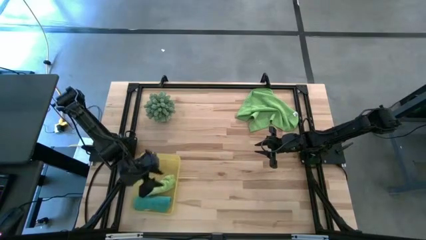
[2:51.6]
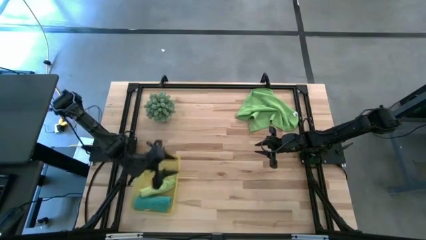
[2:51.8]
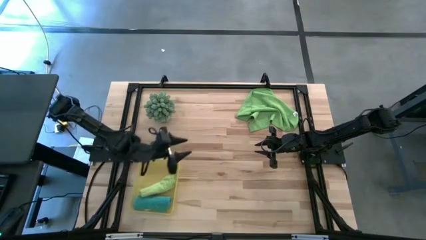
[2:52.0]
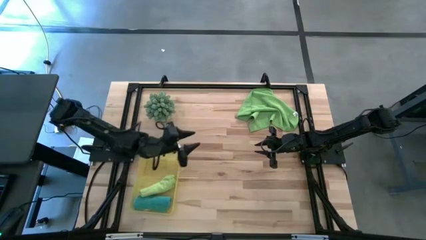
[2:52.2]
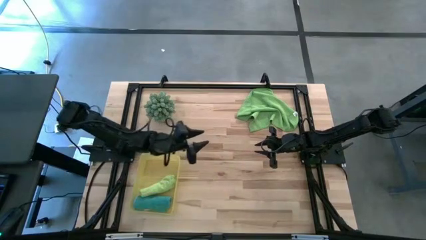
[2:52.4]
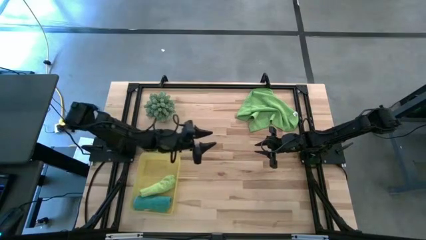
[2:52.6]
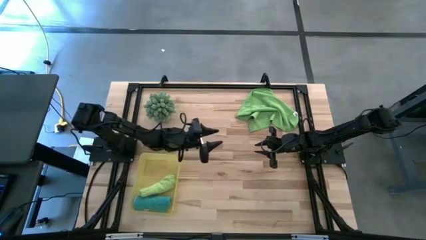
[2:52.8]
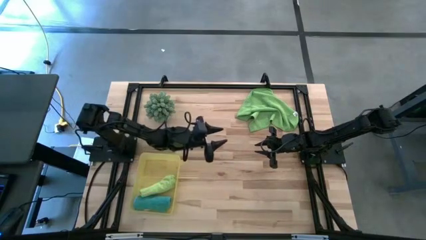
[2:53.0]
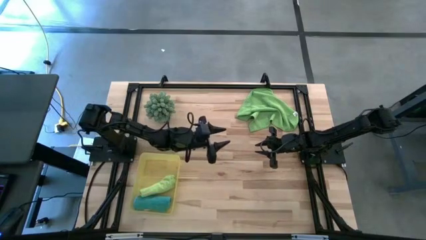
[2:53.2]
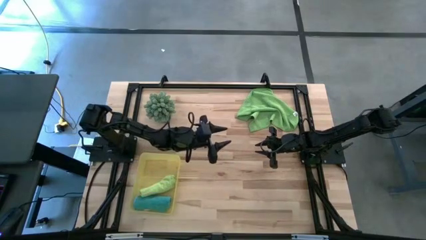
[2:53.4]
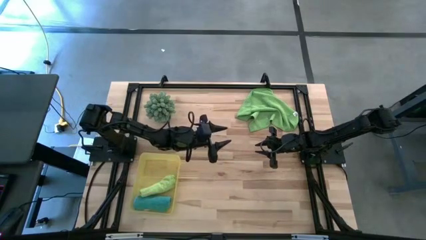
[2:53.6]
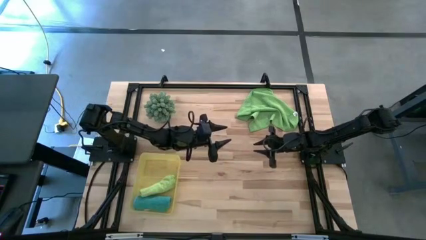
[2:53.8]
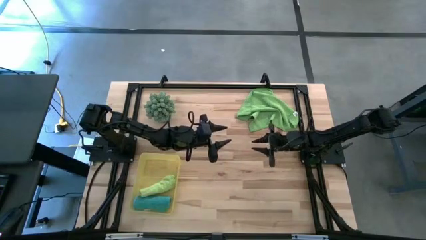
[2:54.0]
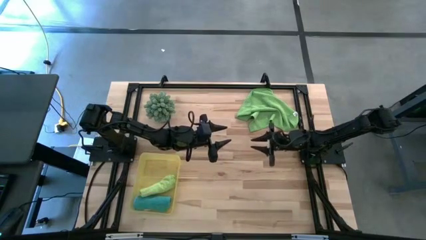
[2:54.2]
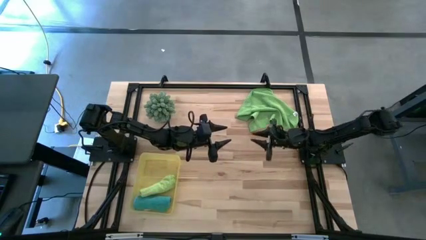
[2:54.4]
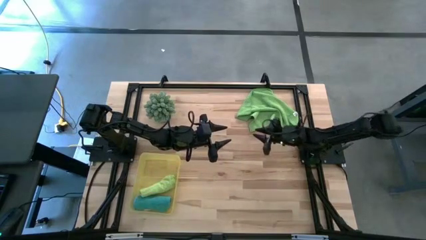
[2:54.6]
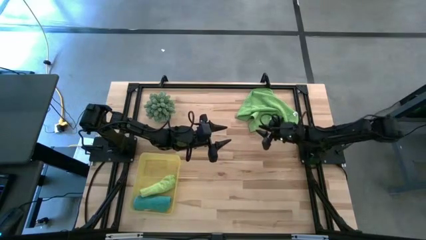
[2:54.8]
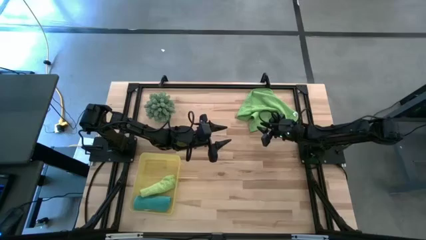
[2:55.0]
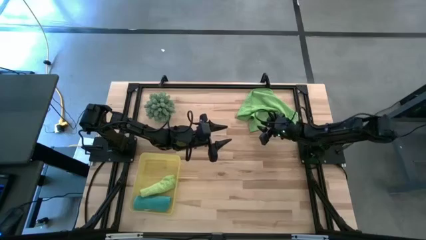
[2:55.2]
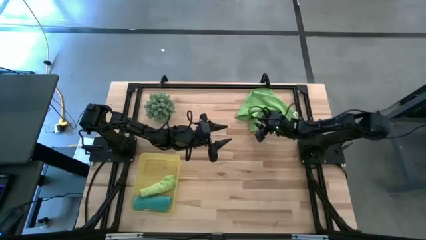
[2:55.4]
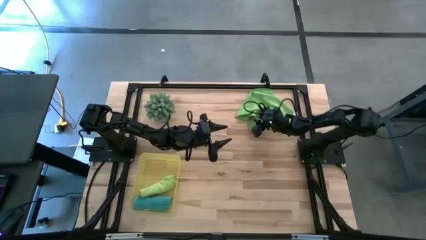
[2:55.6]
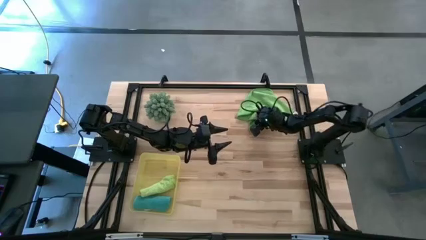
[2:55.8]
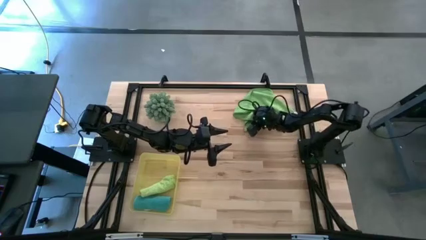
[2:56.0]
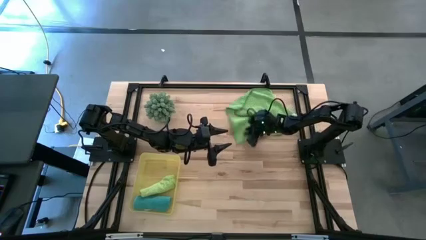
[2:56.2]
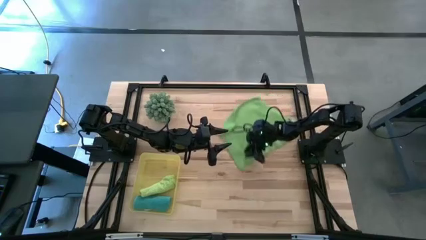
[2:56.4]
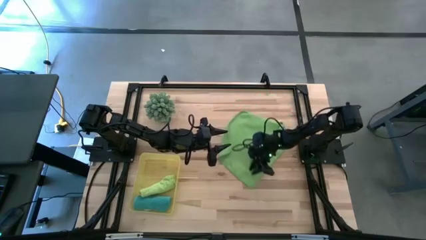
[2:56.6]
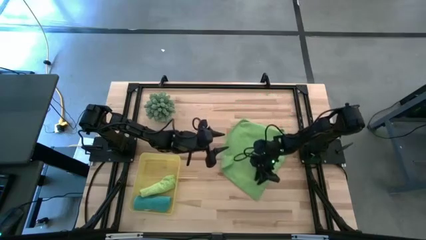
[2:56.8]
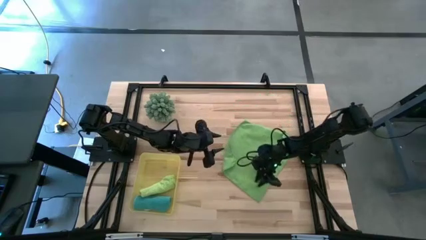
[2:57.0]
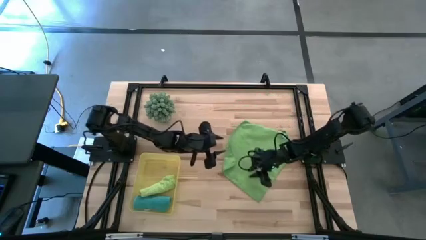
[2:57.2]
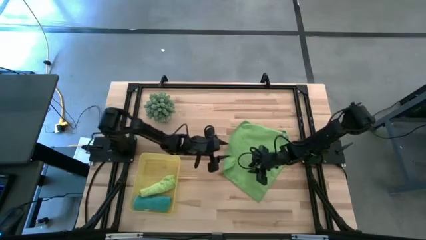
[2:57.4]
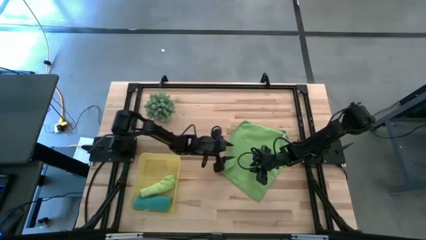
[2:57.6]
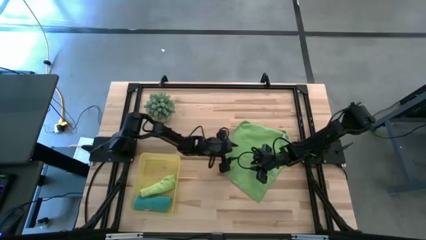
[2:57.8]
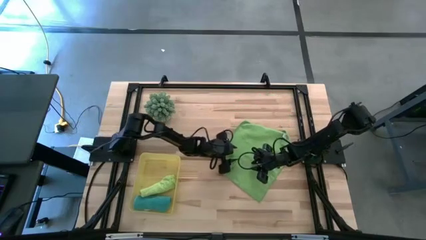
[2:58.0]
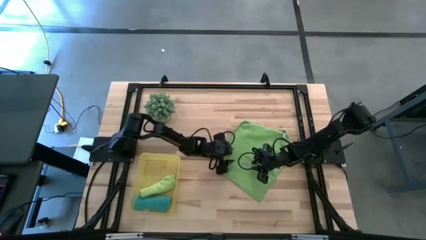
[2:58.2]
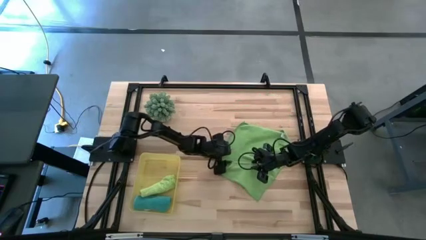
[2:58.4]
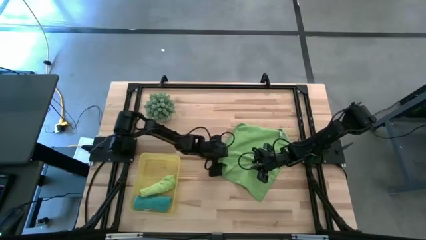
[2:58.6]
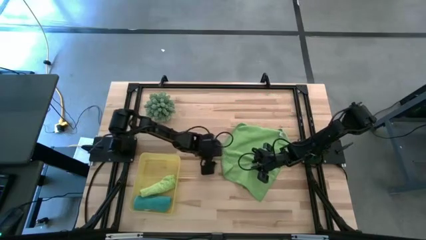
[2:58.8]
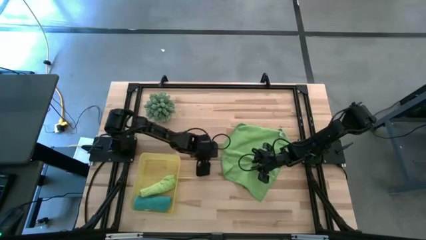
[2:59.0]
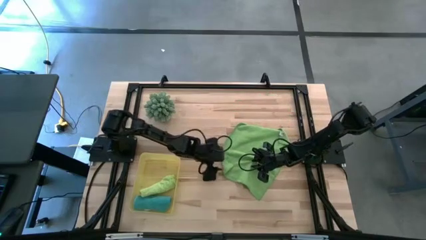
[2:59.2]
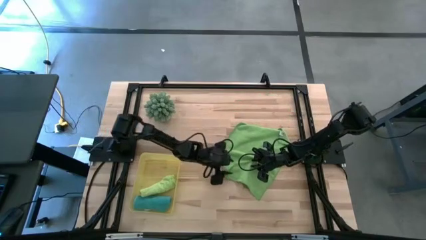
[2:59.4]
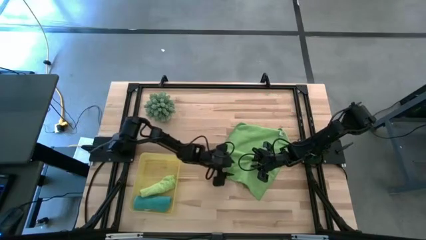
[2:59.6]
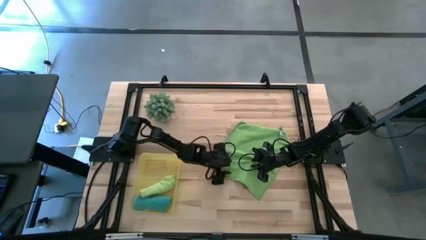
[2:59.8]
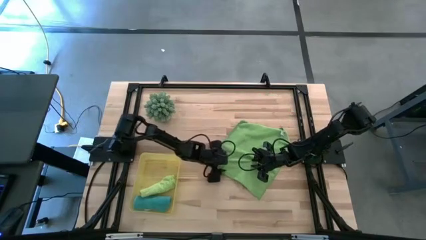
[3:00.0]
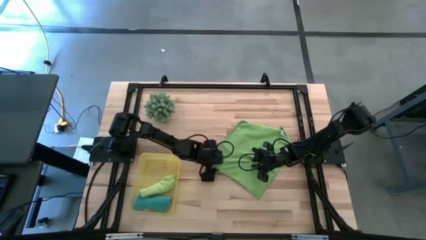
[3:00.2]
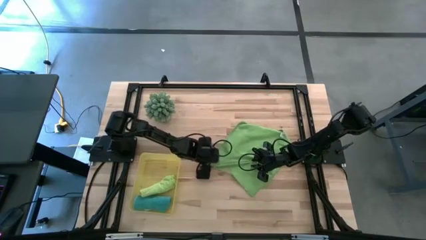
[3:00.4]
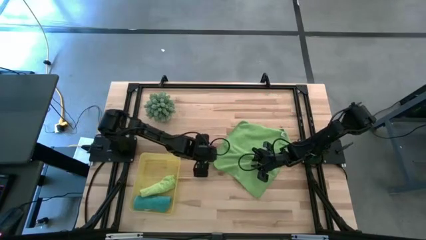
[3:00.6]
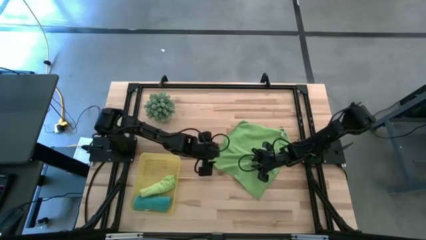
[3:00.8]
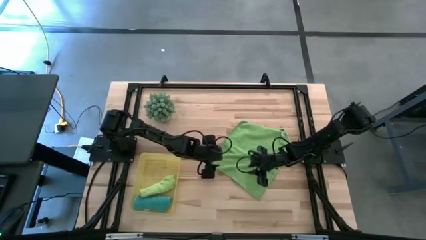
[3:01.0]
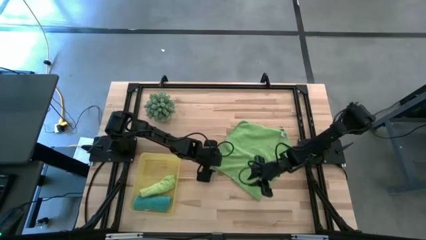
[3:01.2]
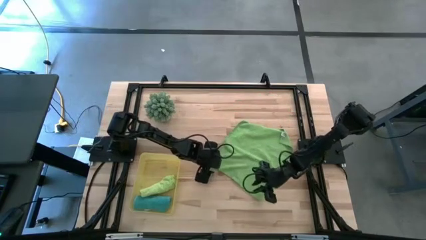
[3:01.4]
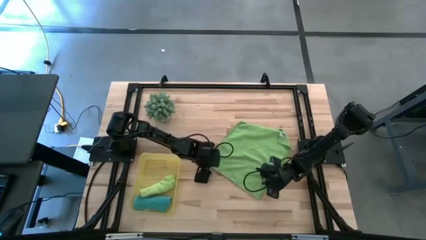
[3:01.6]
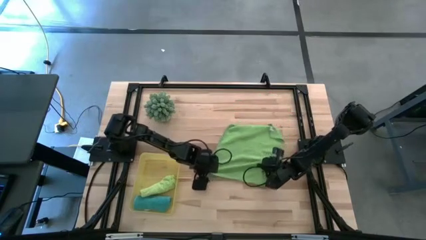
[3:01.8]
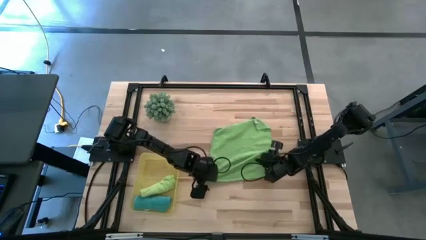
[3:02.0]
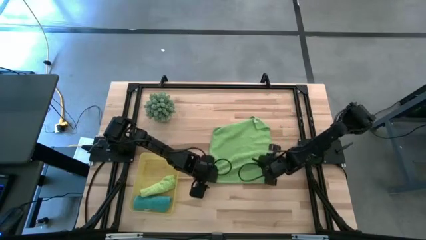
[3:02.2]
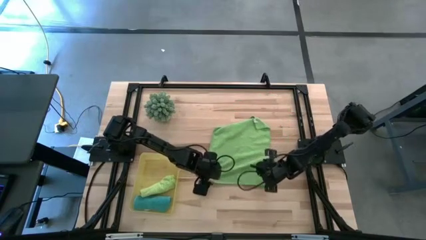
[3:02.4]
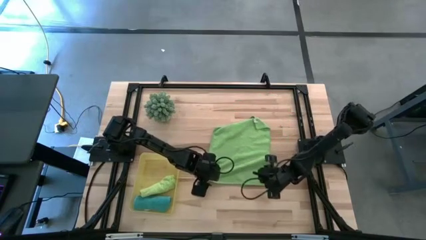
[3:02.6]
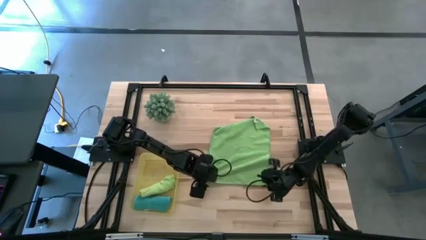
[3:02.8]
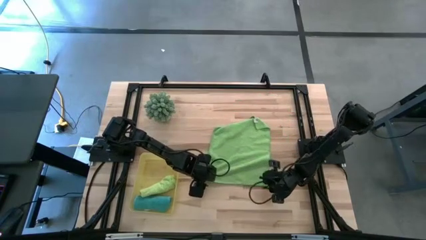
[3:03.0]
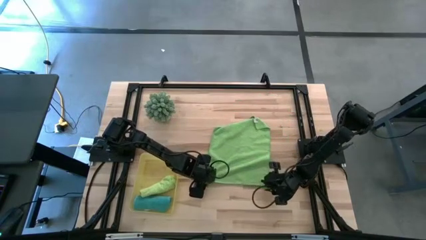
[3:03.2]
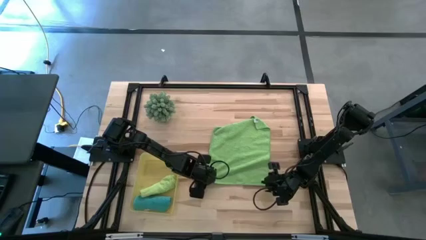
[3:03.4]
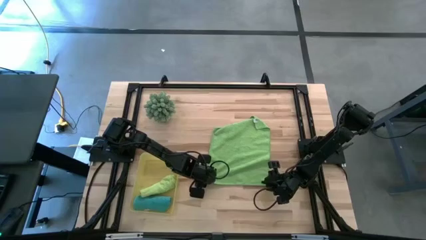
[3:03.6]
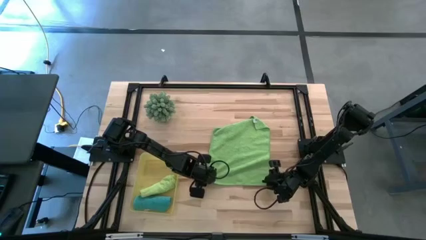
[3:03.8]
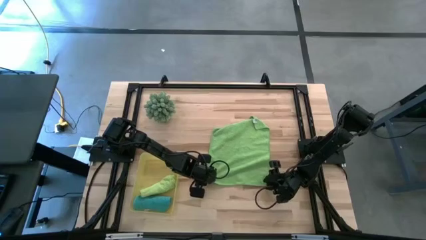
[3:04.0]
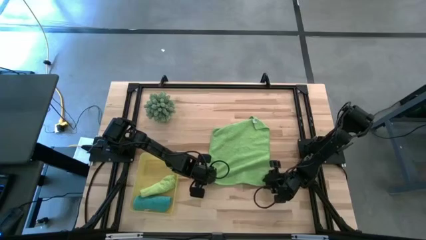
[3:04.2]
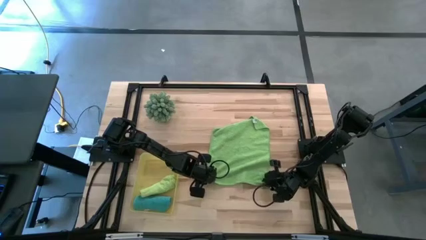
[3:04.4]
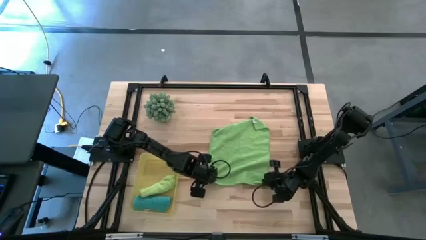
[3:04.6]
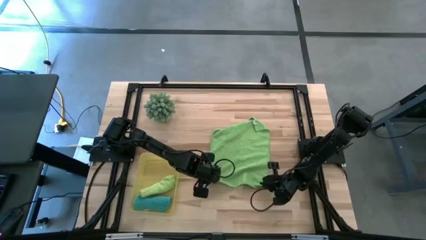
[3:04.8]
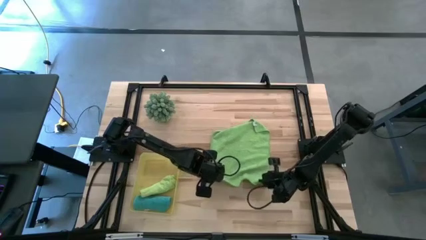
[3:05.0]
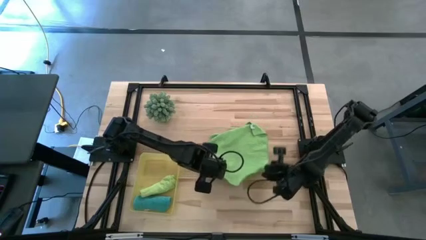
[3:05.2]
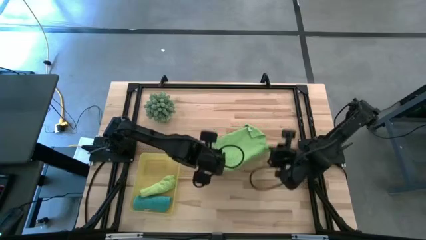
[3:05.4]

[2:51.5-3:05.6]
Task: Roll microfiber towels into tight, uniform cylinder then place into a basket
Fold the green towel

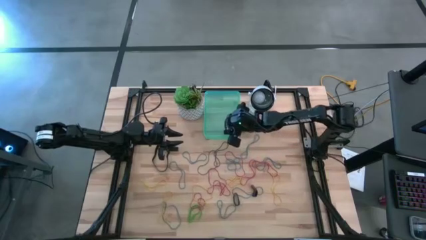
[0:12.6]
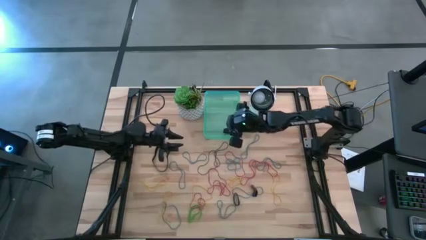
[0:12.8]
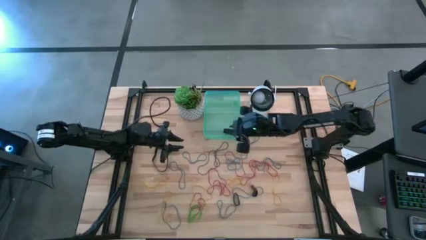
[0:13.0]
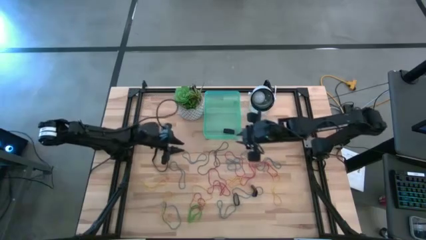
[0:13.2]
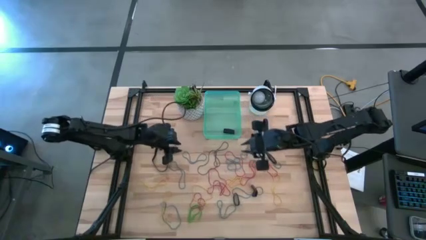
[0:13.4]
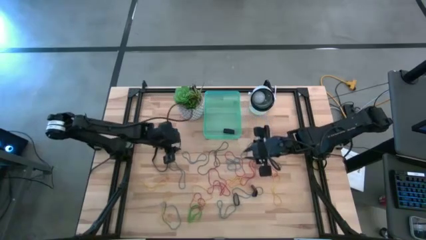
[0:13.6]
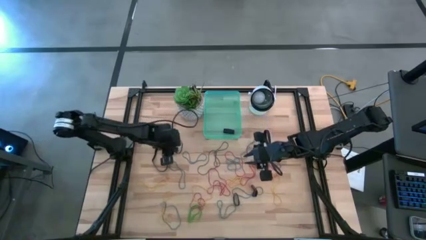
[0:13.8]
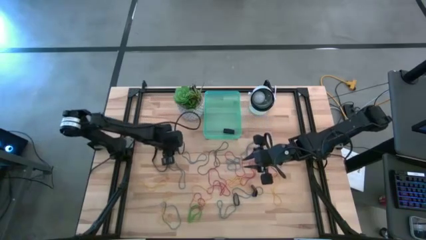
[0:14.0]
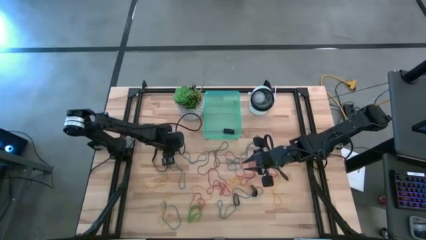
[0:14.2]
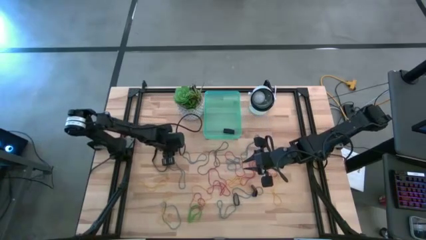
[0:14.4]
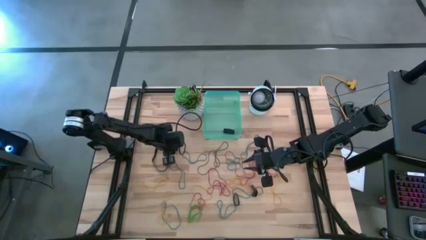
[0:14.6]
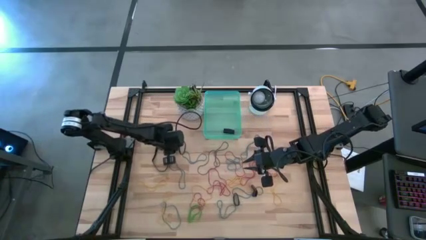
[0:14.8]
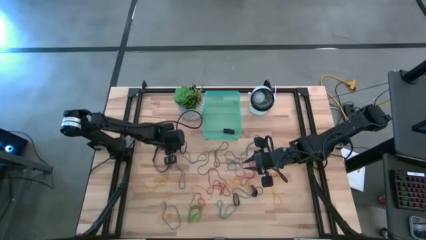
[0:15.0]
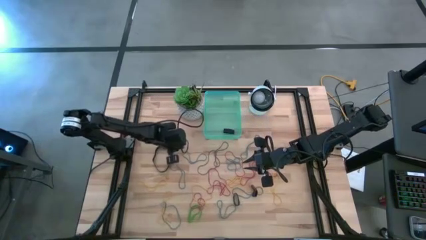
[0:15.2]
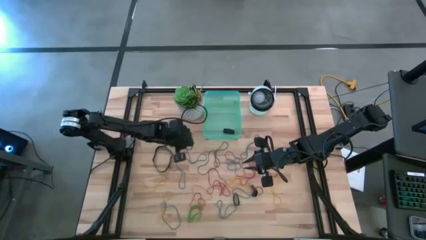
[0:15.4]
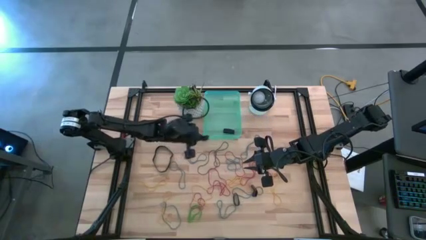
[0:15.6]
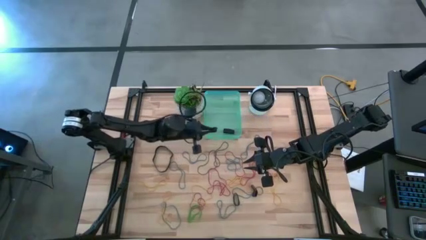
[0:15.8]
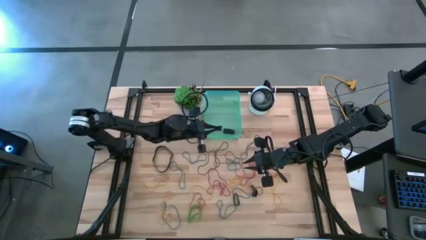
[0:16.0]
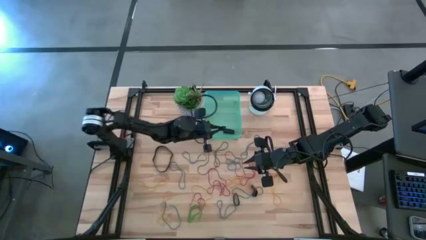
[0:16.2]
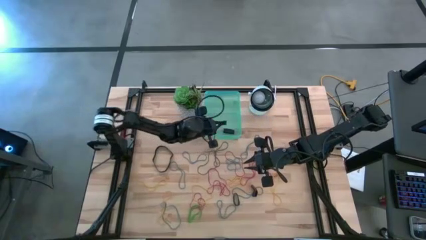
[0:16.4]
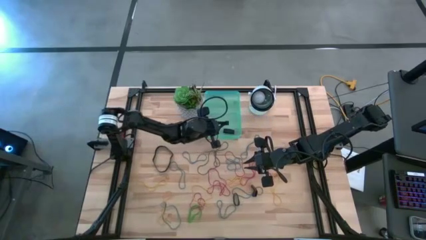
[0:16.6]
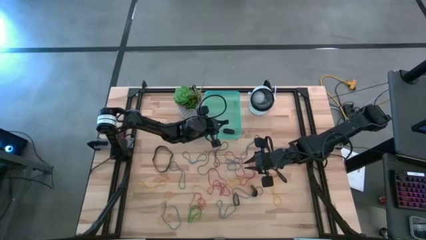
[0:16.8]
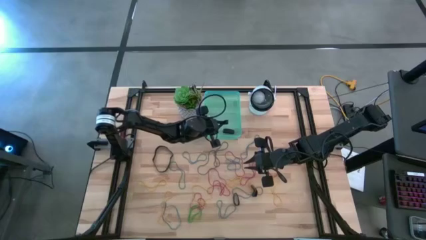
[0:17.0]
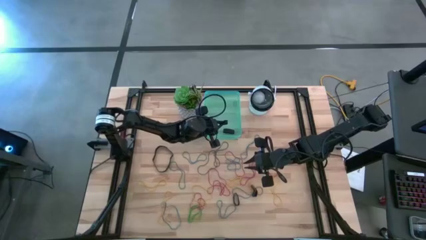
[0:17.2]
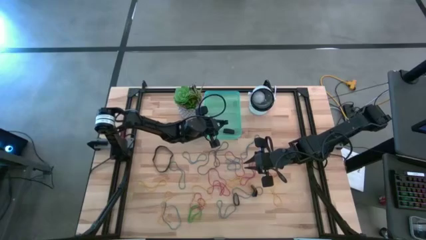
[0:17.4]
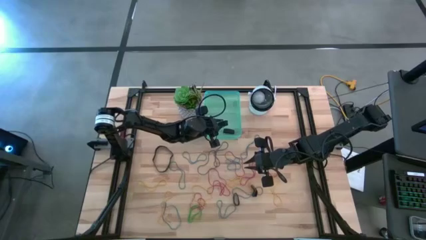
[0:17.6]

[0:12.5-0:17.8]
Task: Pick and place rubber bands into bin
Put the black rubber band into the green bin
